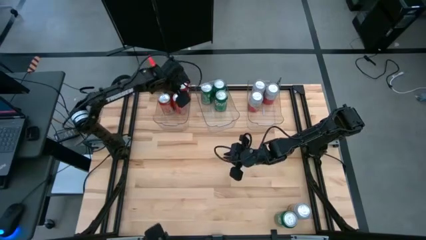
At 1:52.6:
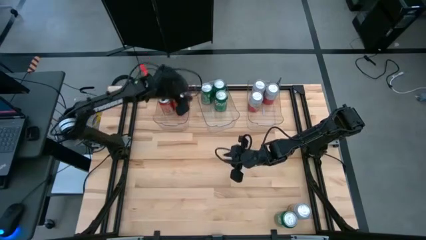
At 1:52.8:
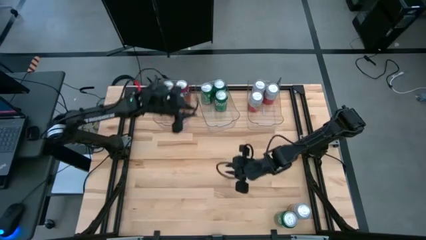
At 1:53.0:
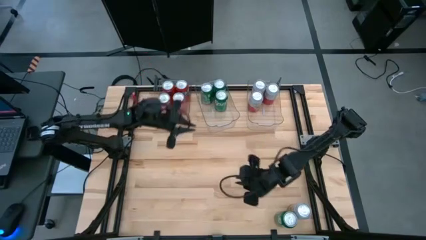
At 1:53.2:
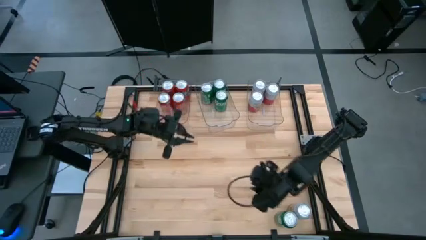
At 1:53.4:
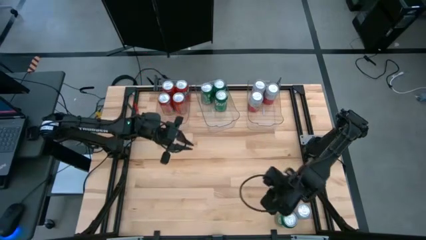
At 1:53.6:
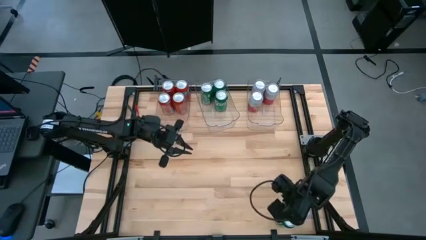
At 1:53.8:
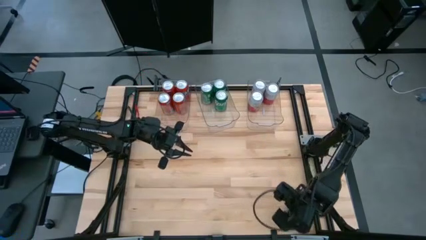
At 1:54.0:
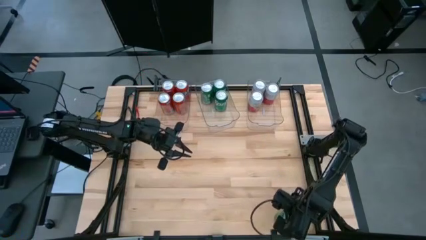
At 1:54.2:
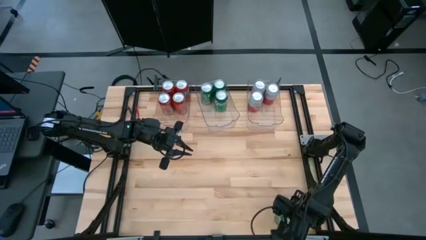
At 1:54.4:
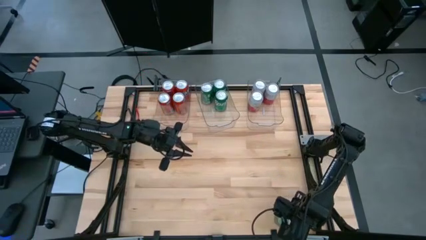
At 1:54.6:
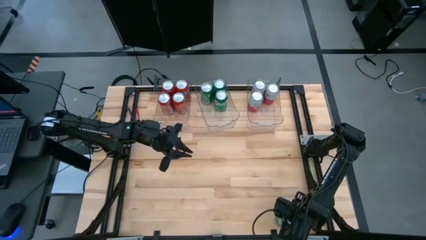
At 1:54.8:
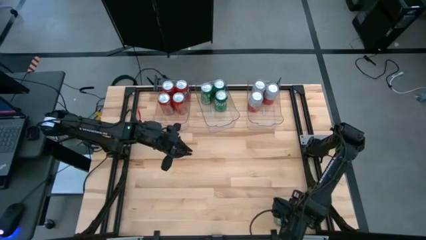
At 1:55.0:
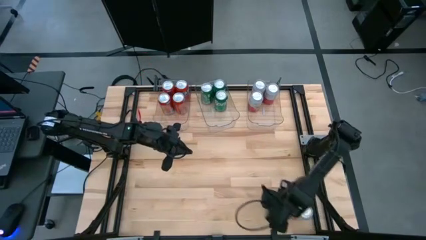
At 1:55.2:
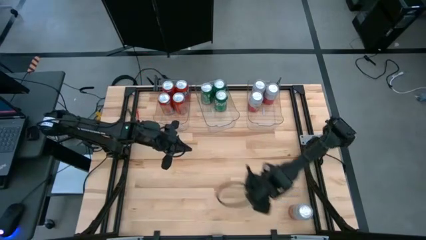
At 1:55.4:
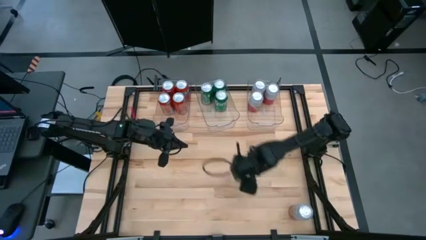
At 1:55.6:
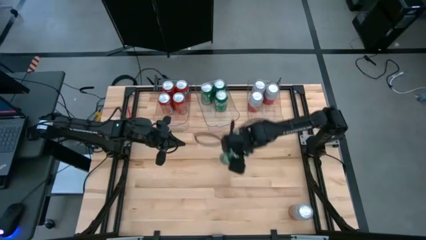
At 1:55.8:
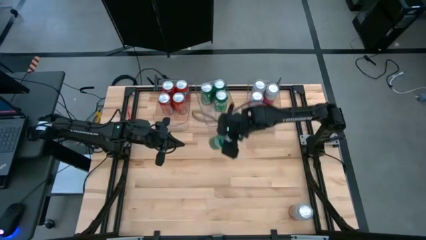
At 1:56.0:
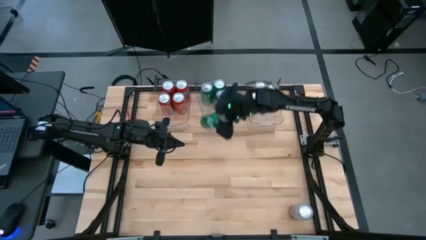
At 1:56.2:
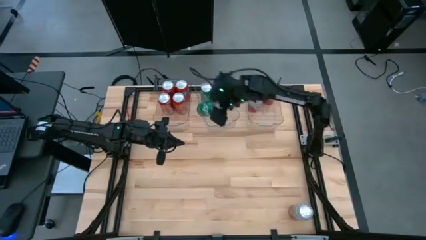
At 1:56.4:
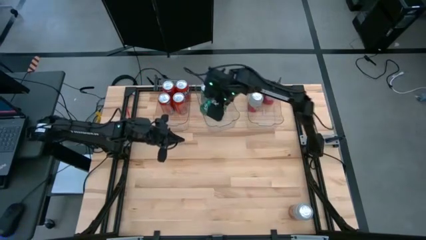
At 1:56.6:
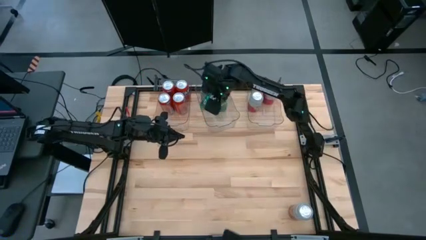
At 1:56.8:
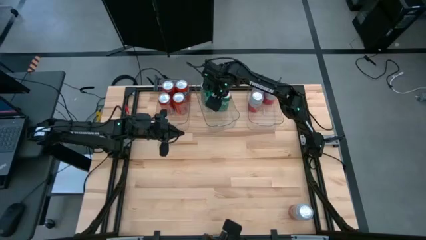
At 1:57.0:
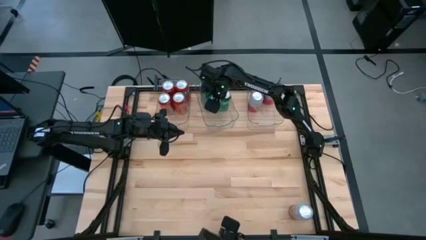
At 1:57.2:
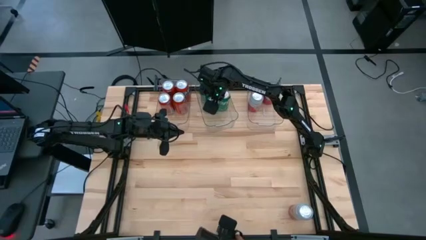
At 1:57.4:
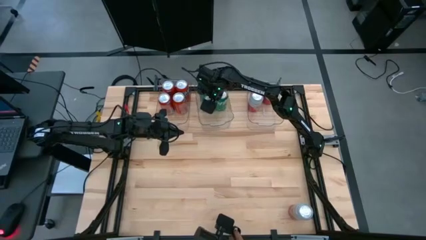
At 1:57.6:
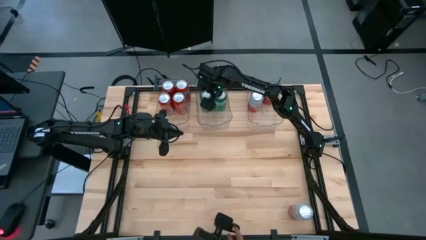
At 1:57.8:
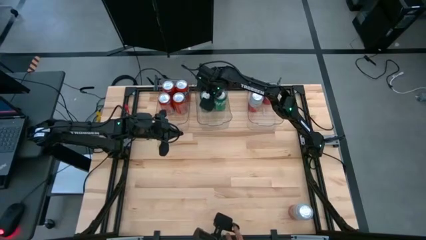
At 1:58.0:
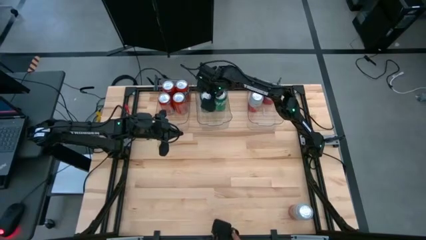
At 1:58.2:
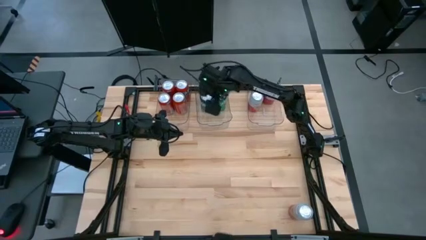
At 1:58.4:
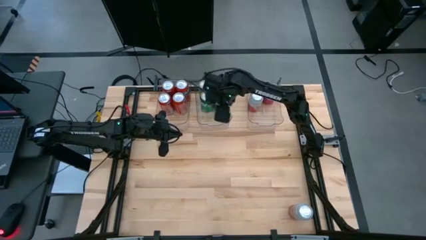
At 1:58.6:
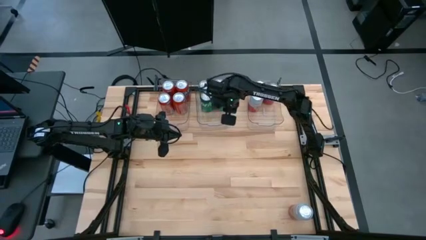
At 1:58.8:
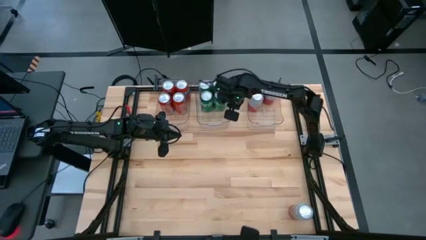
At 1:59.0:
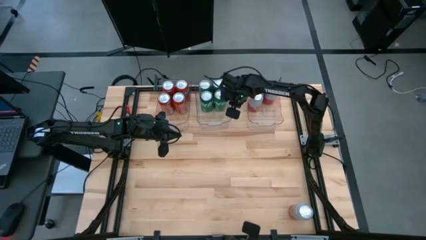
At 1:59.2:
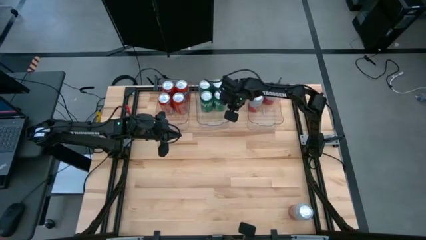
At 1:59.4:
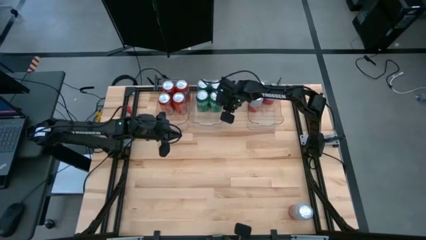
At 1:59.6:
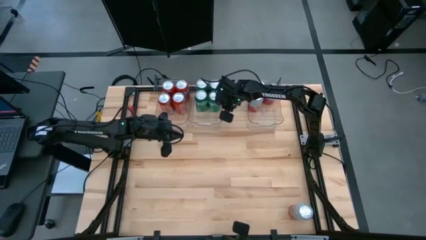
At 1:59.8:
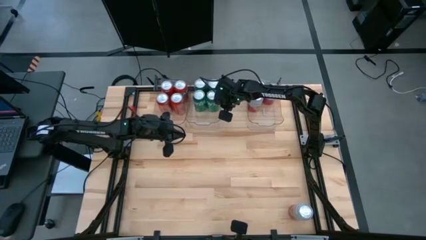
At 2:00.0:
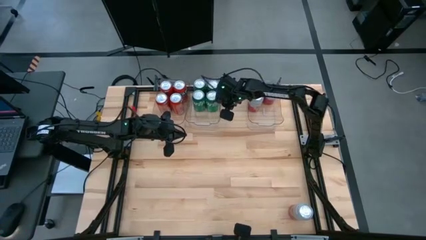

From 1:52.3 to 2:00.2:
Task: Sort soda cans
Put the green soda can into the middle transparent bin

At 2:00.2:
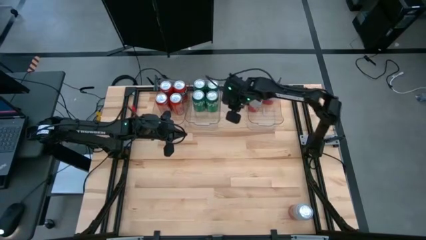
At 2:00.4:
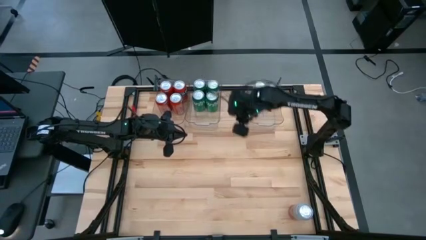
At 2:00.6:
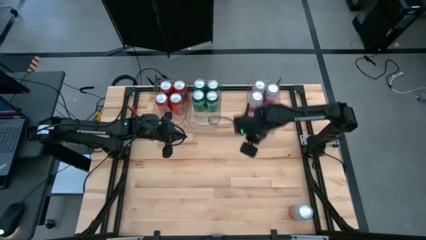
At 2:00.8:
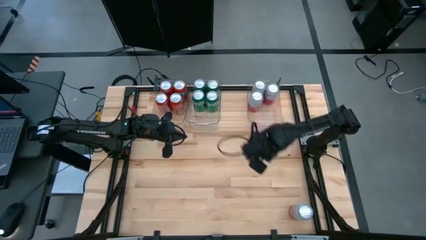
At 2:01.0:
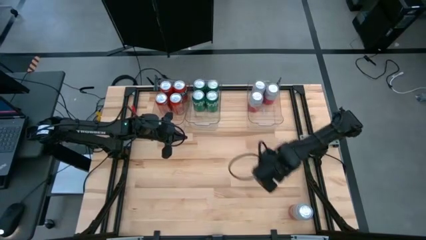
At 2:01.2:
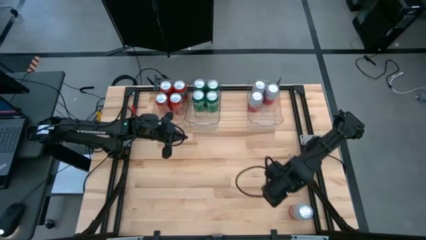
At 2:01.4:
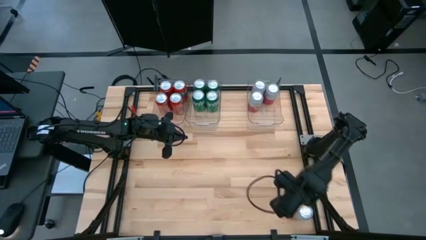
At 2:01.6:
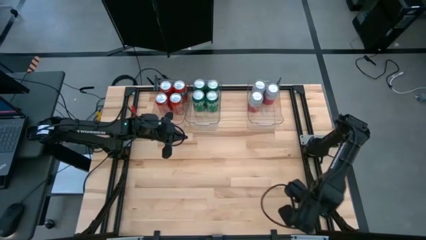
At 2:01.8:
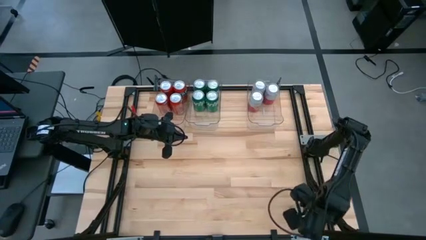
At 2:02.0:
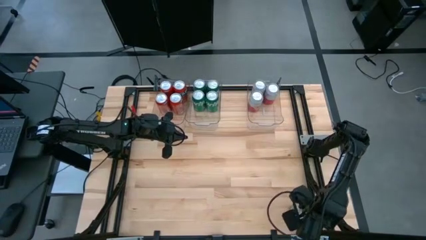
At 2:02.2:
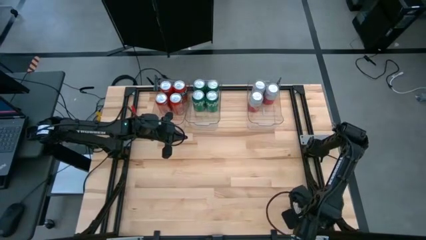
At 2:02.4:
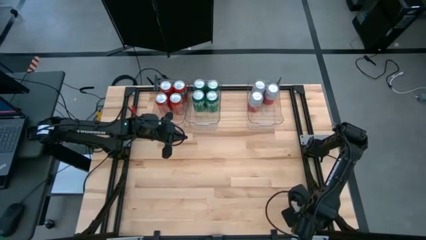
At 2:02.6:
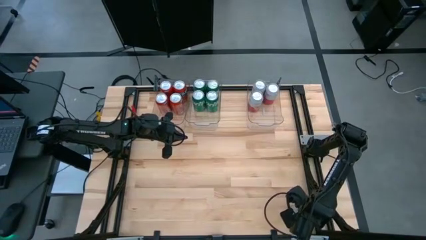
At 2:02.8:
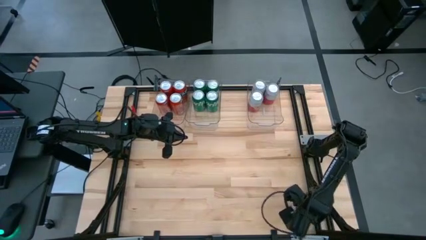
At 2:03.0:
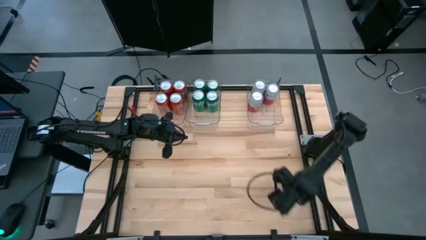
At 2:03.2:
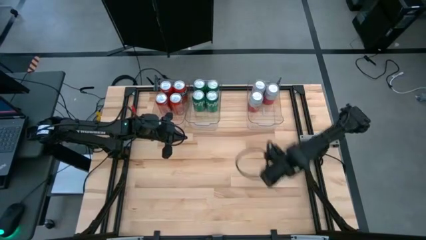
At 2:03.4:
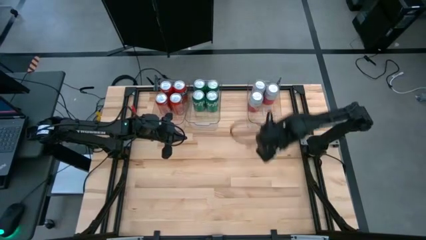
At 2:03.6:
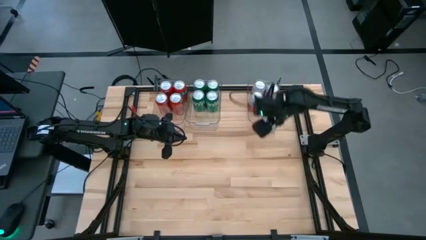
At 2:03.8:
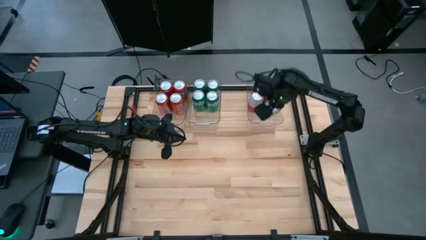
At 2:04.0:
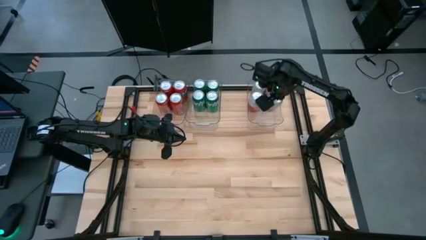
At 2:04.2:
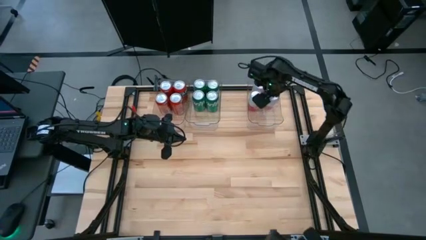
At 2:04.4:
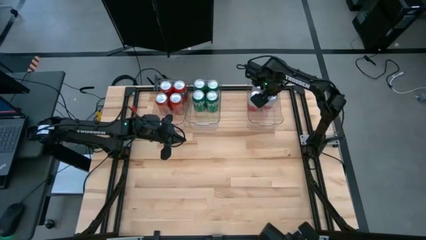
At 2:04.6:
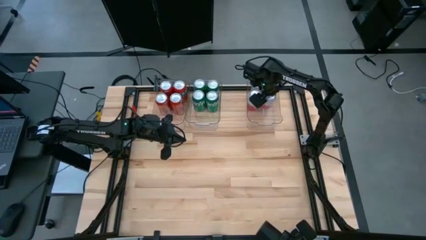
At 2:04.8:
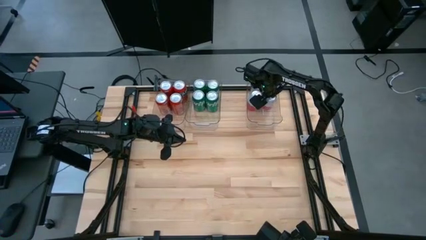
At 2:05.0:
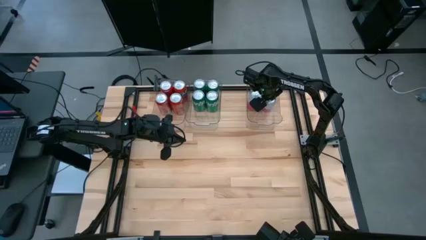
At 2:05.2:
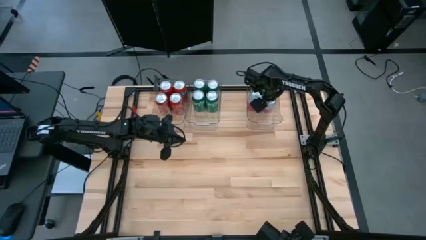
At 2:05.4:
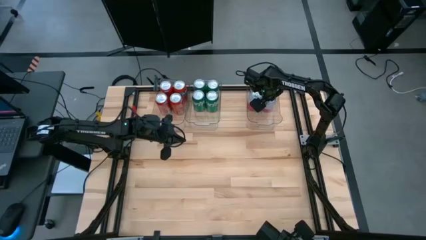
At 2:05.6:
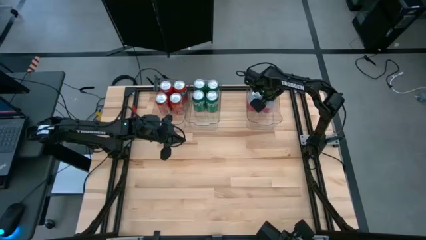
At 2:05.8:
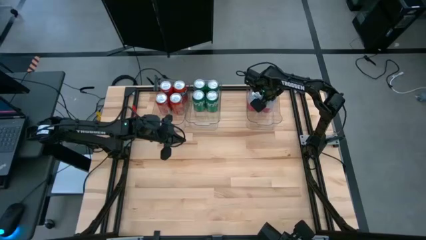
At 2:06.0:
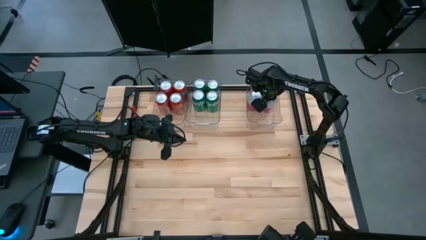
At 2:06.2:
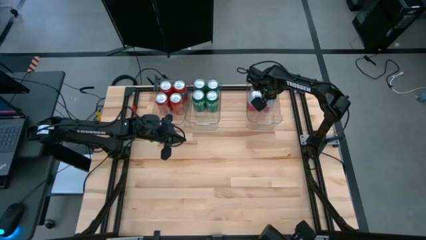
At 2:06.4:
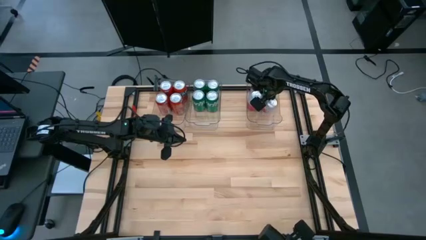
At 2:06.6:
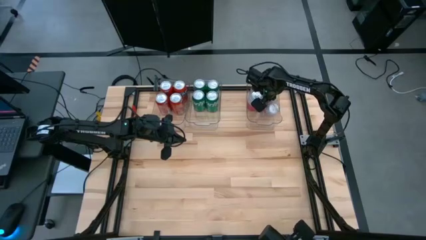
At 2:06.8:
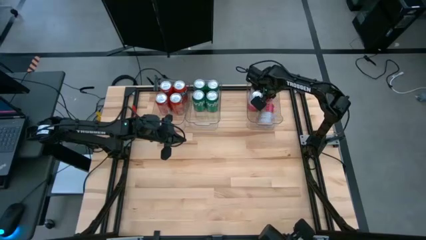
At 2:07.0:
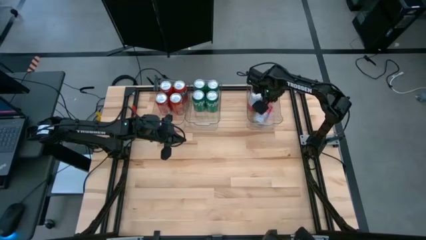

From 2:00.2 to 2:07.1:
Put the white pink soda can into the right transparent bin

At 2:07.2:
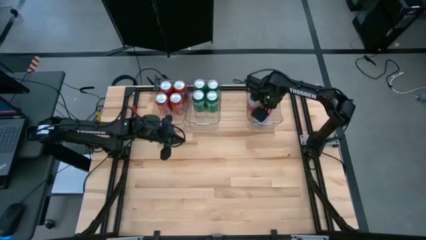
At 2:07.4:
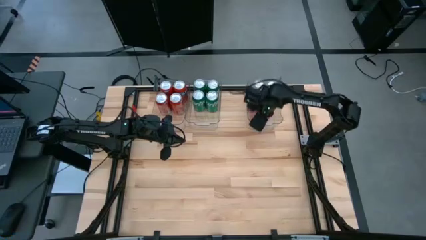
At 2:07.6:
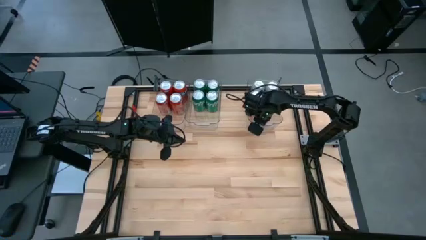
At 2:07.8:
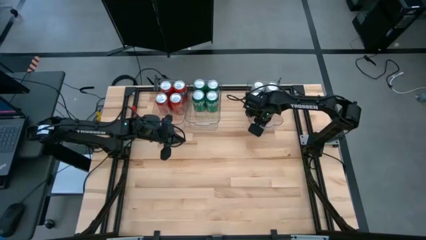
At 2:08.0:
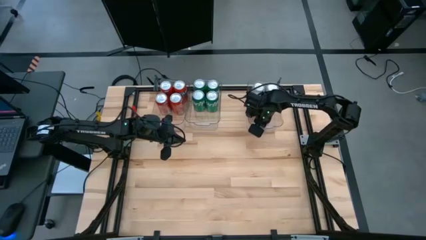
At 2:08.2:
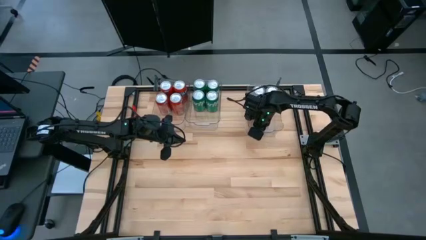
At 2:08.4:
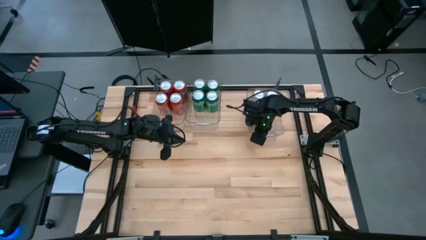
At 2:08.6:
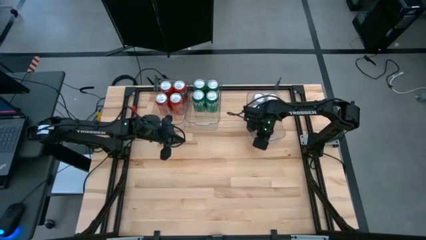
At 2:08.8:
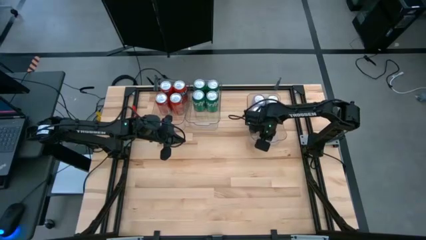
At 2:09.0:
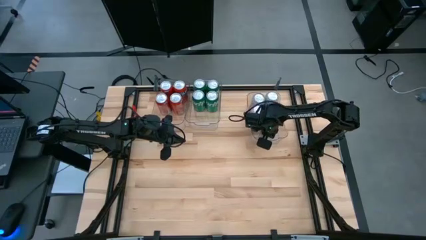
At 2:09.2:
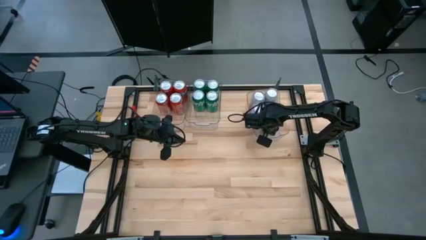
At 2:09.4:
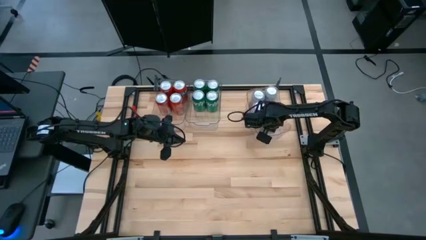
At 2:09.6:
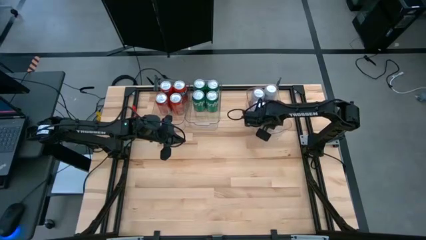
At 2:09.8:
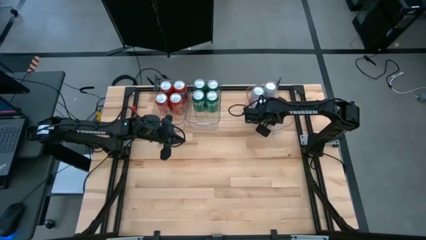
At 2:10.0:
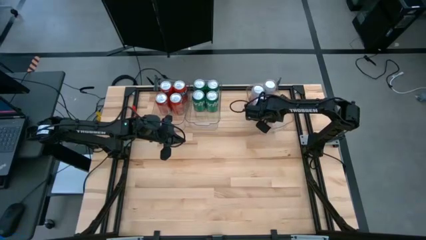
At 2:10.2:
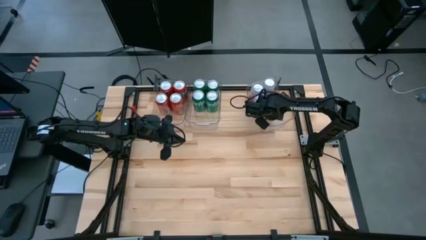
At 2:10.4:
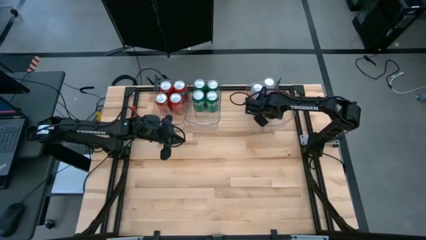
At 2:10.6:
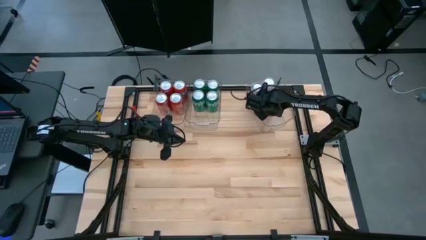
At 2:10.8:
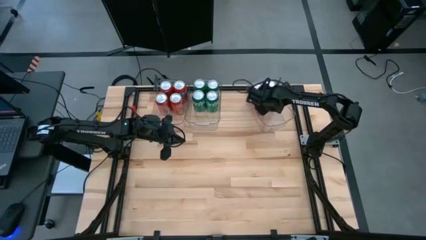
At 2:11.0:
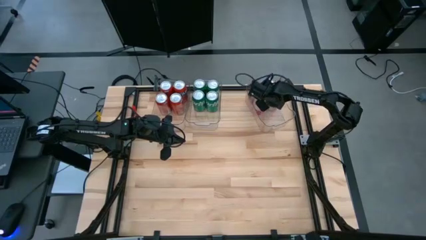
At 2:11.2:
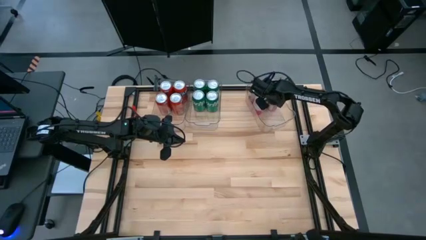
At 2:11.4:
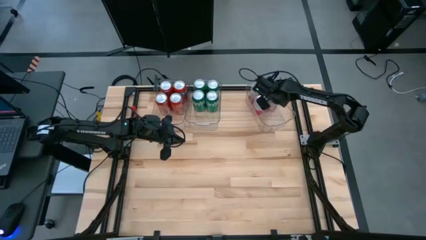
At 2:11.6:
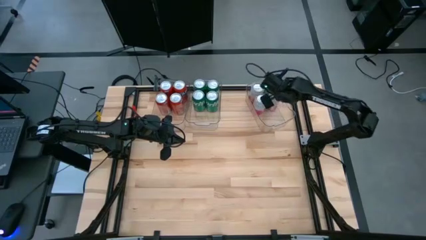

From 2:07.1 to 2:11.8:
Put the white pink soda can into the right transparent bin
